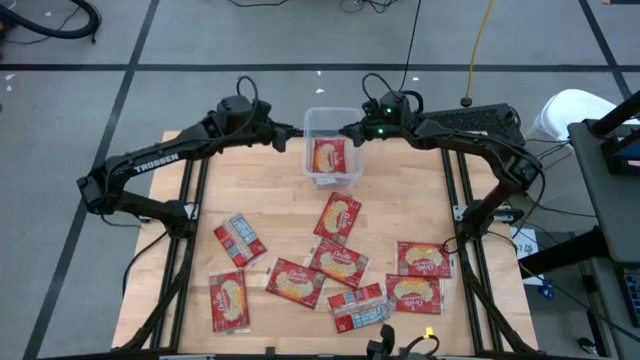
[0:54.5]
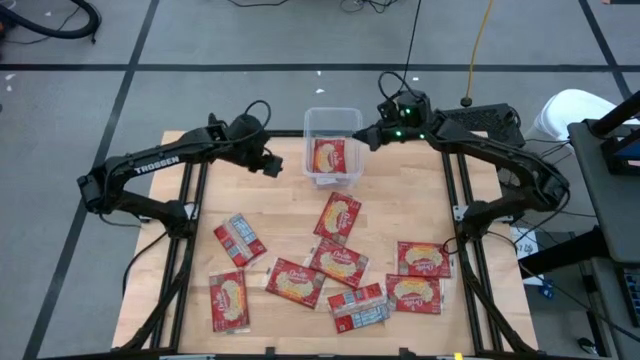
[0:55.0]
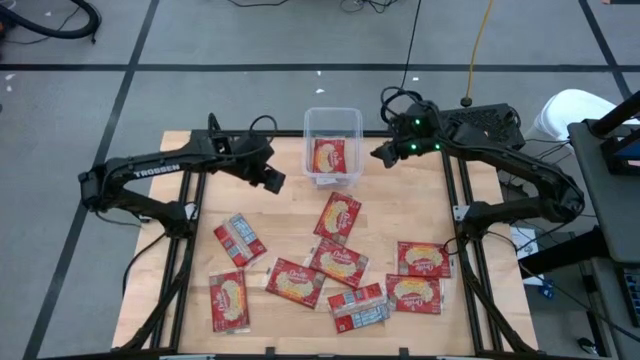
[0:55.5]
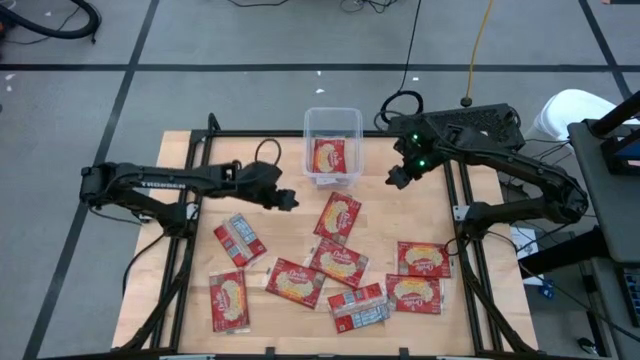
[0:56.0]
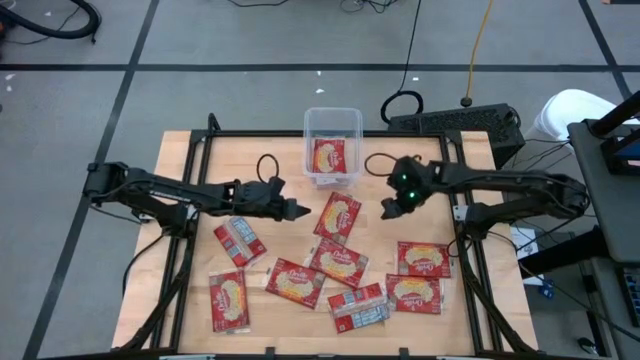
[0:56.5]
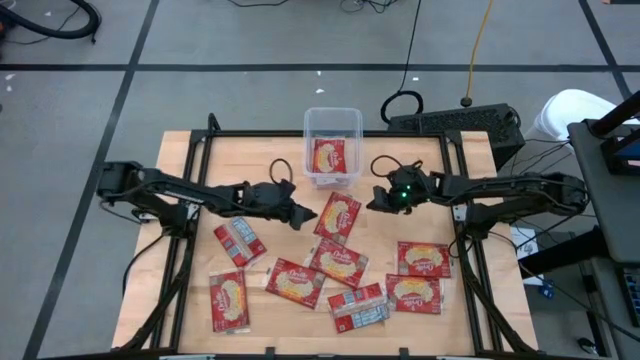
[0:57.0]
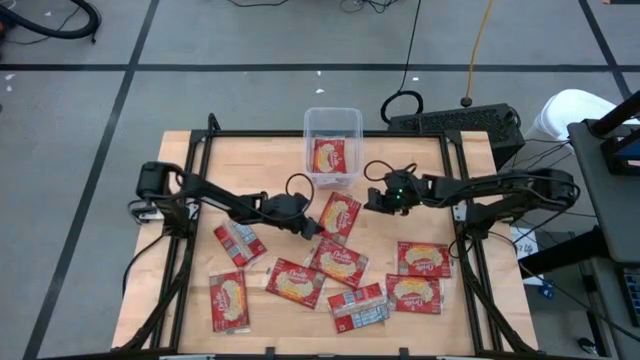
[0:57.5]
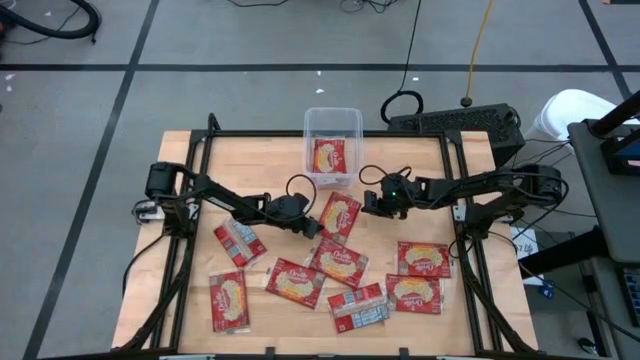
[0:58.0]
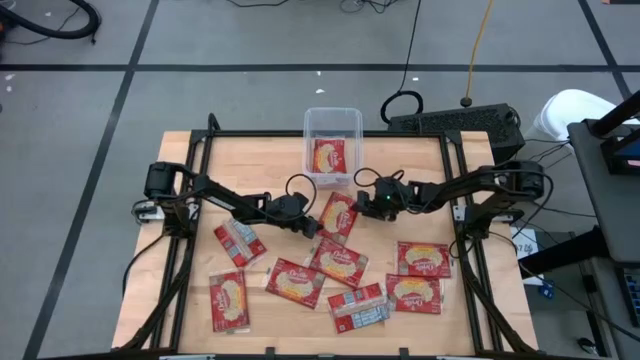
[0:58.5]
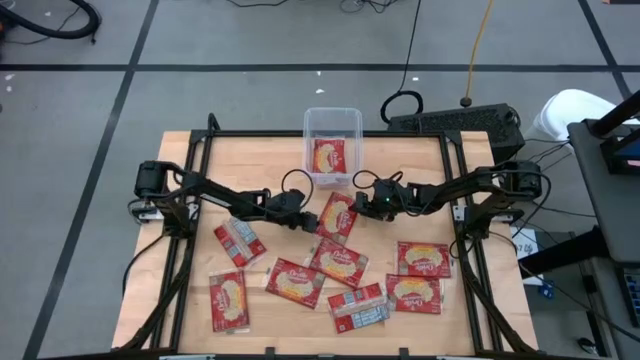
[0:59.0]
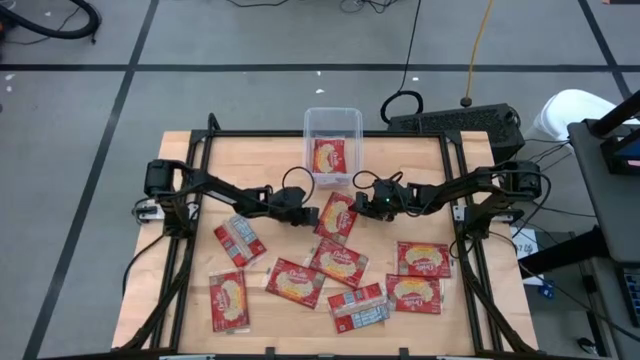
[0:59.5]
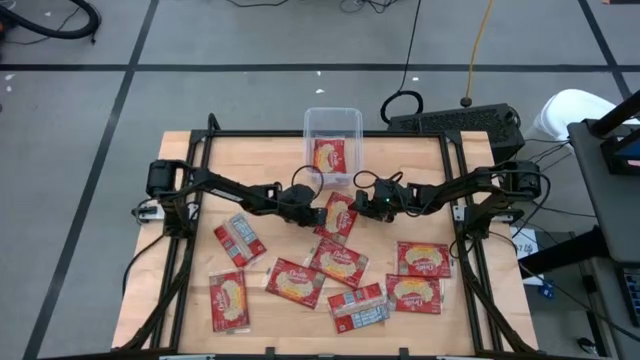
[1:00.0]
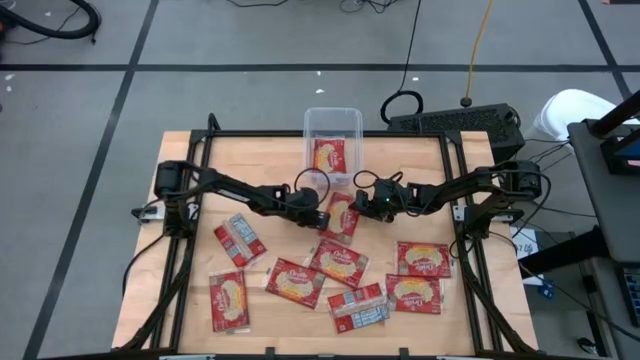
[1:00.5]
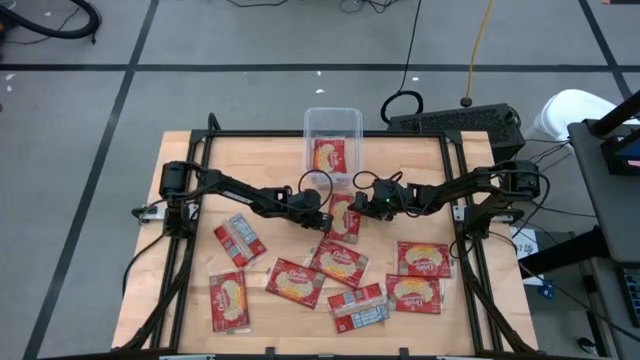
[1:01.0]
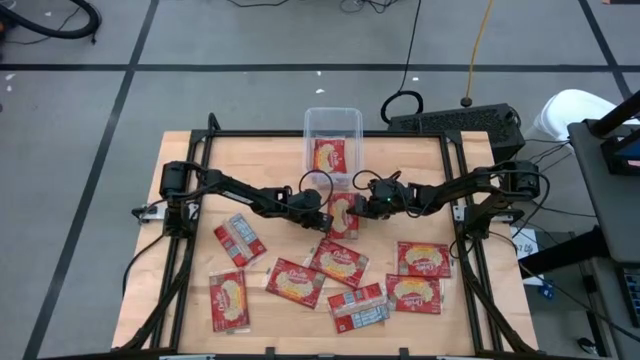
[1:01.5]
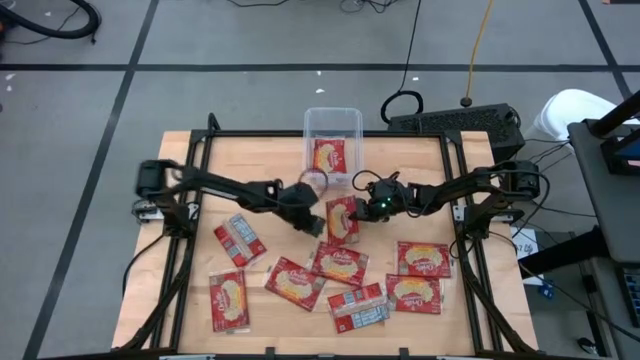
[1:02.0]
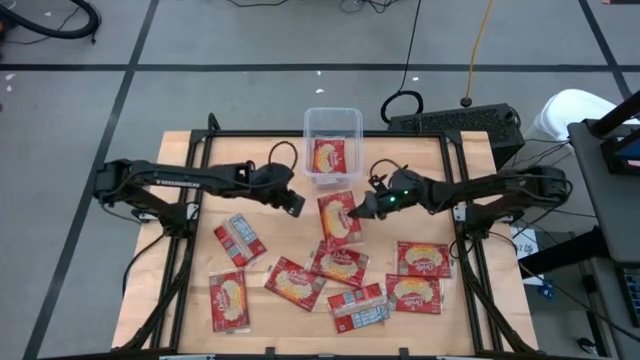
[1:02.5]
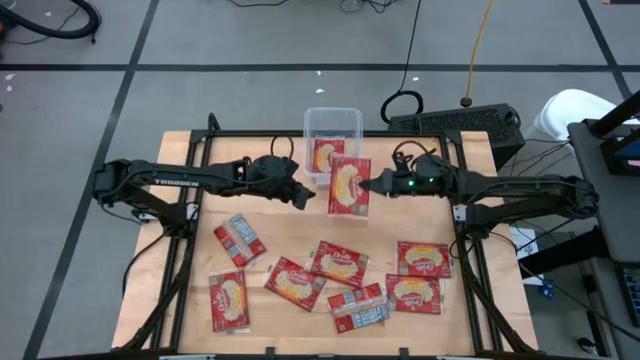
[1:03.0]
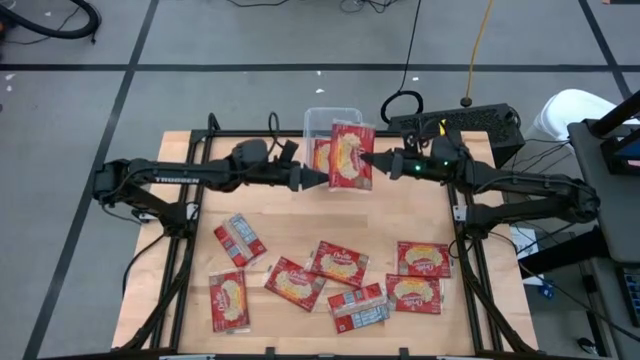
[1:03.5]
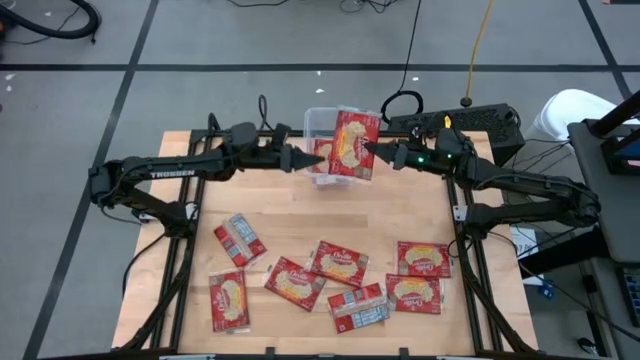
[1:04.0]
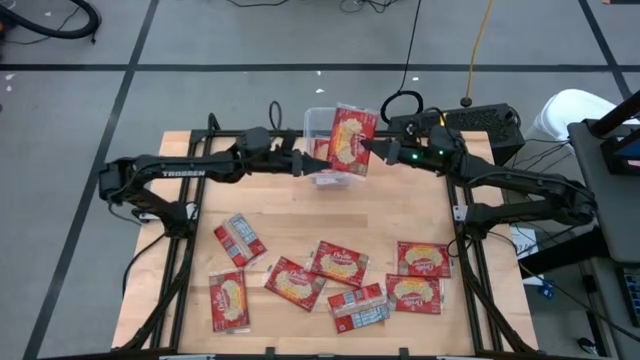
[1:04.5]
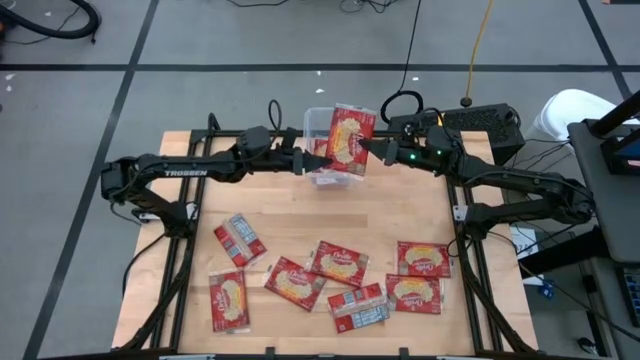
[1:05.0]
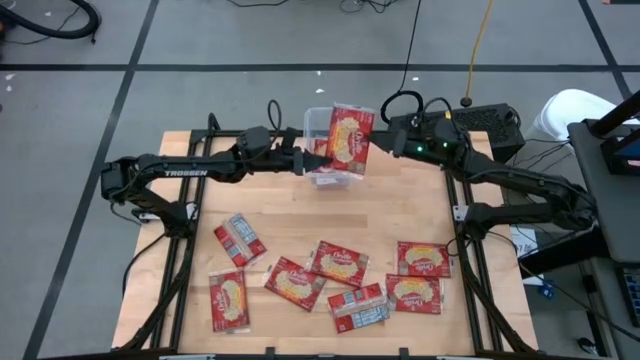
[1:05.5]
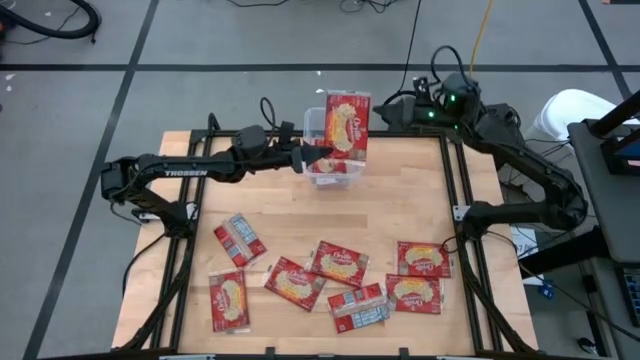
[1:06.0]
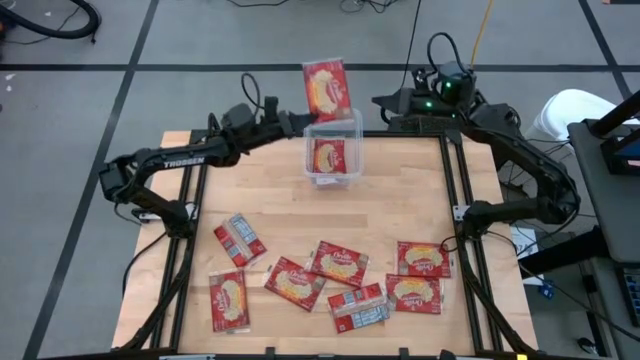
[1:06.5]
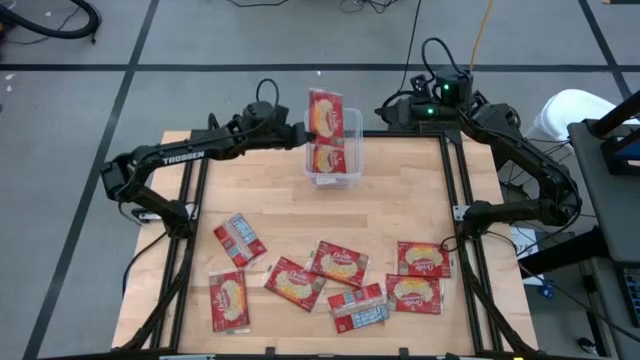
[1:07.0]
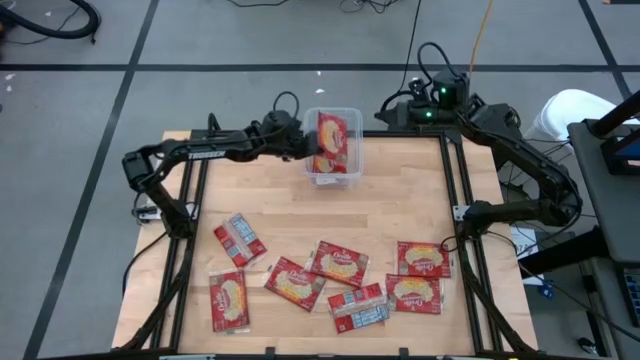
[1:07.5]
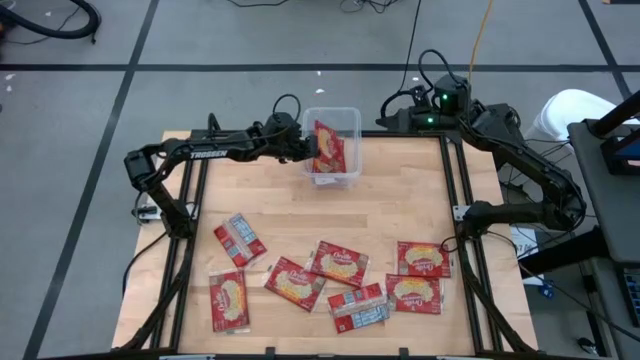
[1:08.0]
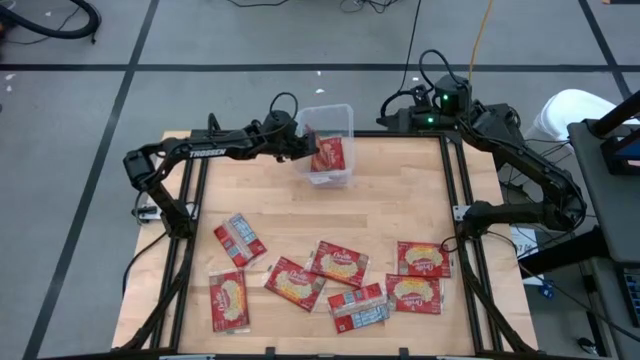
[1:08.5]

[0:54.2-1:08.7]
Task: Sort popcorn bags into baskets
Put the red popcorn bag into the transparent container

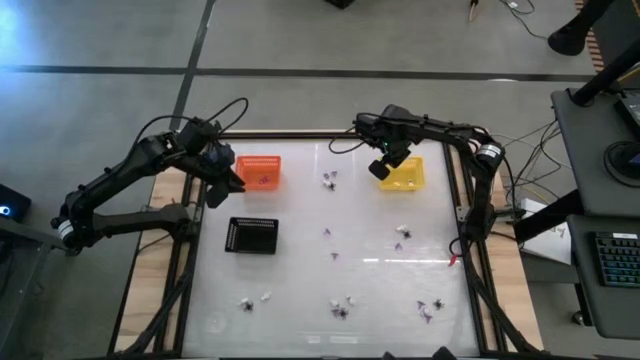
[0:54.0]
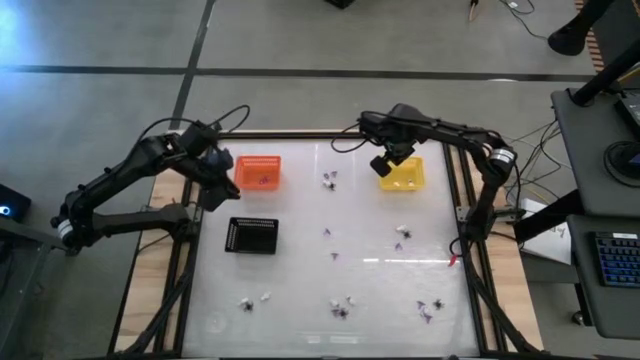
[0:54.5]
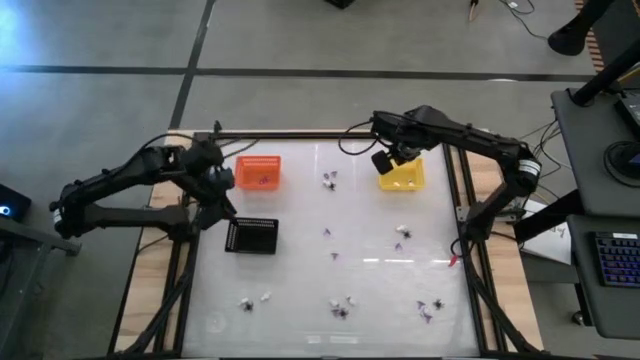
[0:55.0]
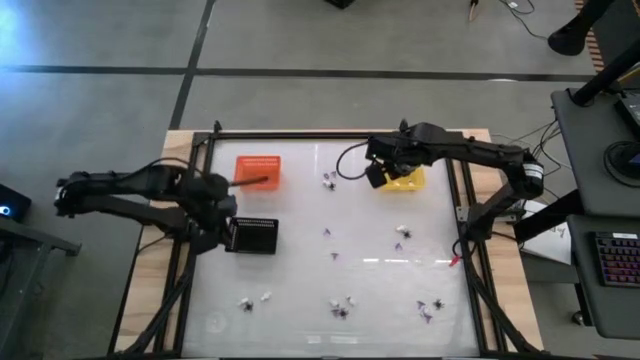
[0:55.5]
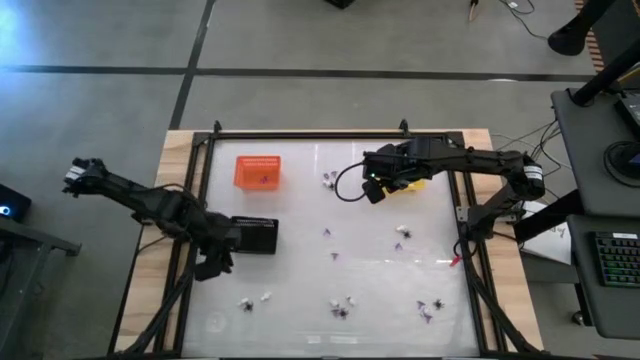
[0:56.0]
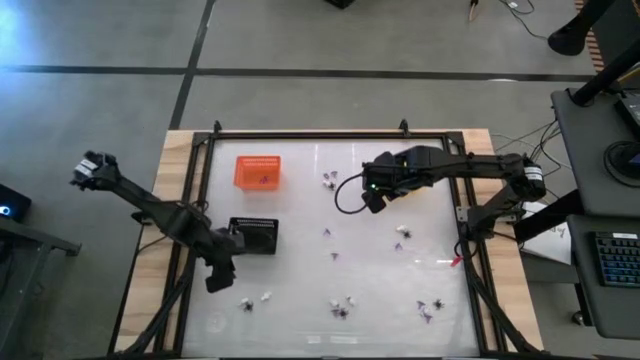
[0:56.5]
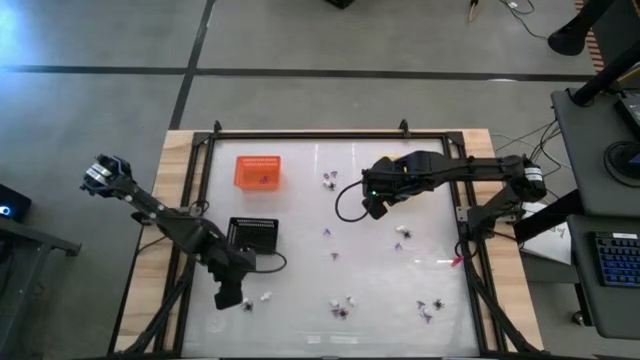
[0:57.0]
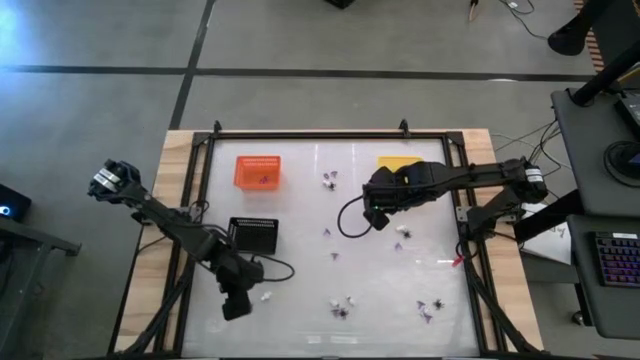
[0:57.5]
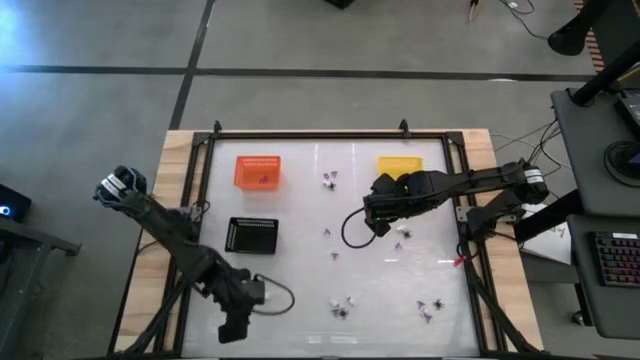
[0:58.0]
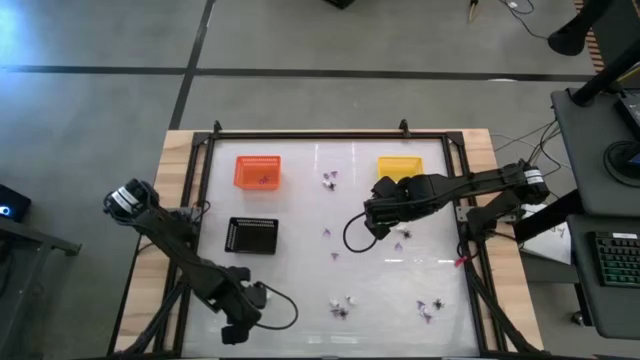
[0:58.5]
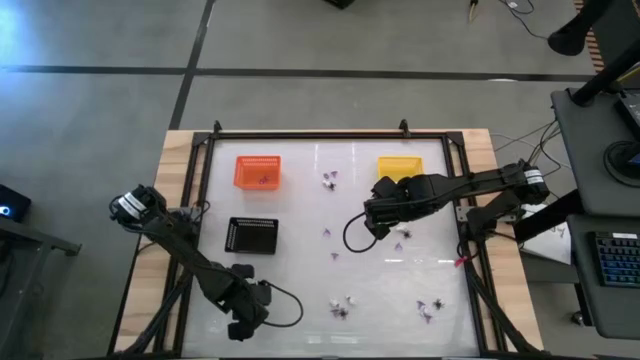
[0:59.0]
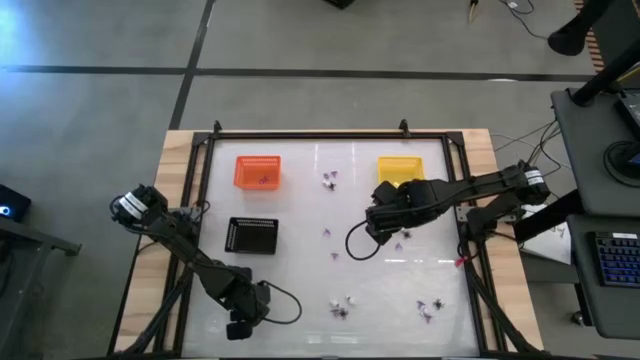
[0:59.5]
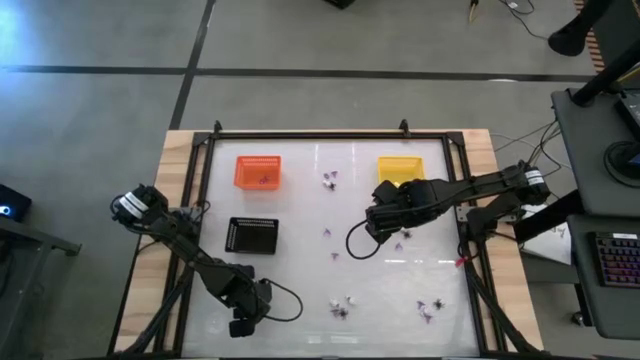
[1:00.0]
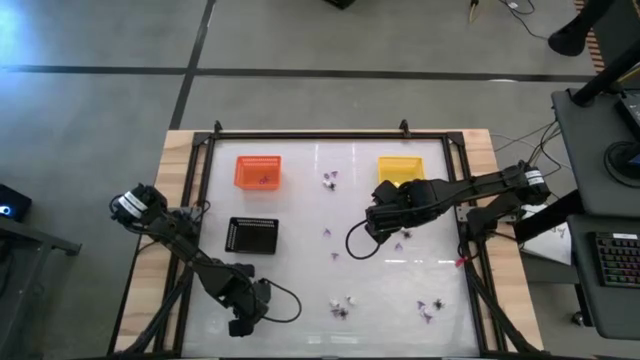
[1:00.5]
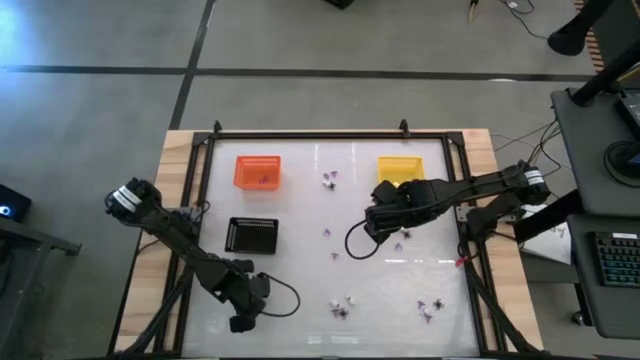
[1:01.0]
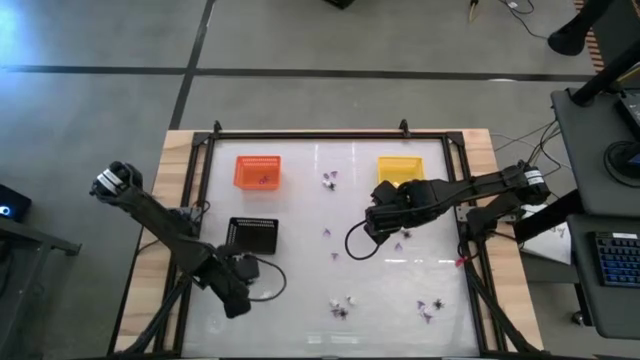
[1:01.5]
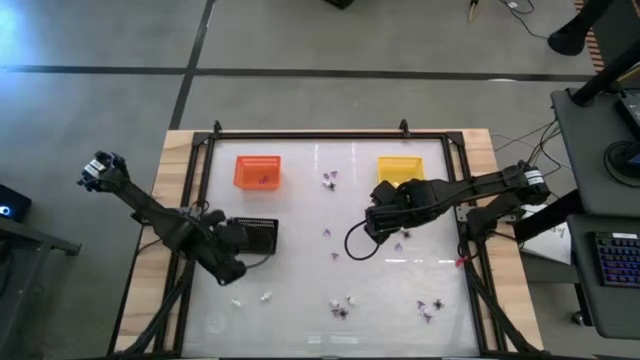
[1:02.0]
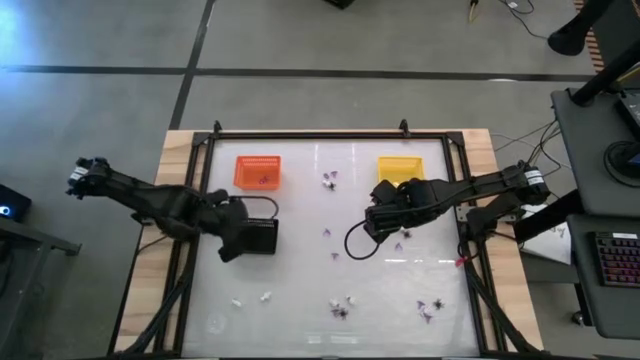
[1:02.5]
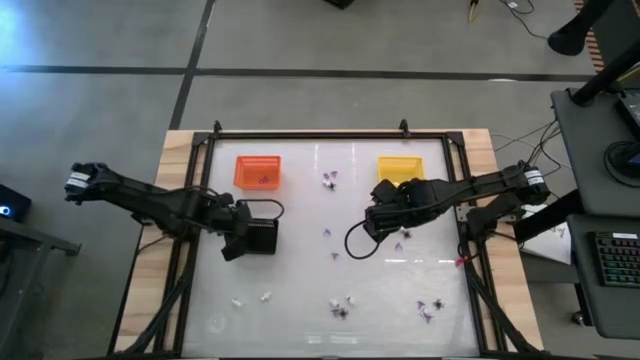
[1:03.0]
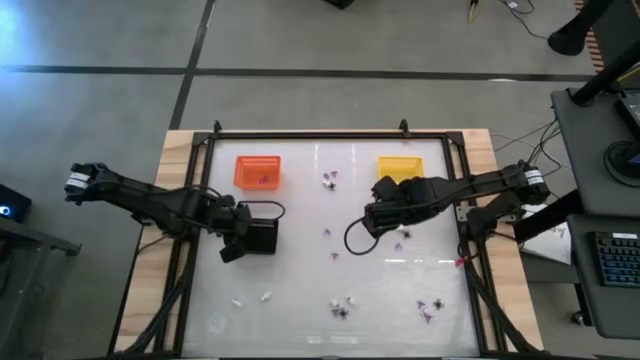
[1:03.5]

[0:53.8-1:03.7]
Task: Sort Halloween decoration
Put the black spider toy into the black bin
